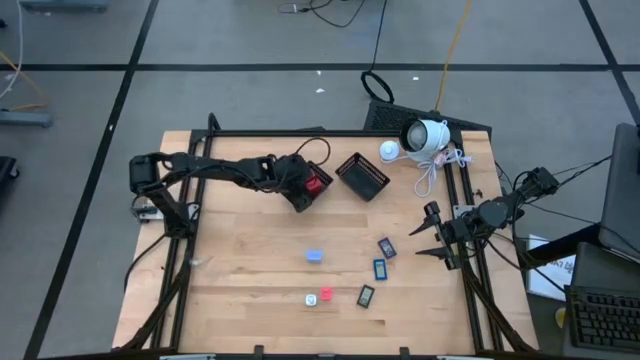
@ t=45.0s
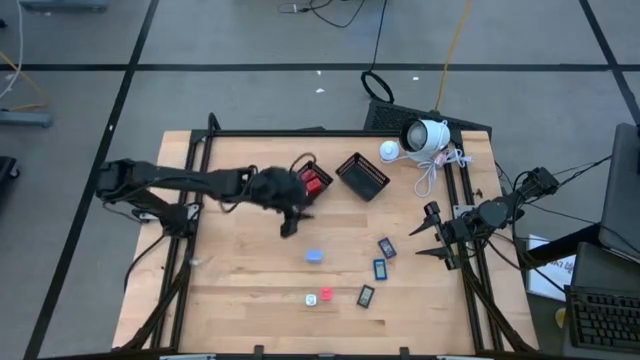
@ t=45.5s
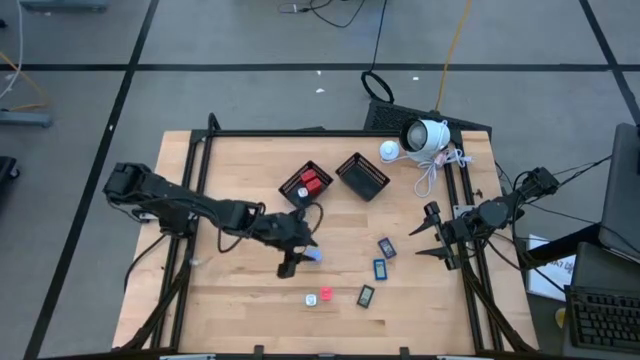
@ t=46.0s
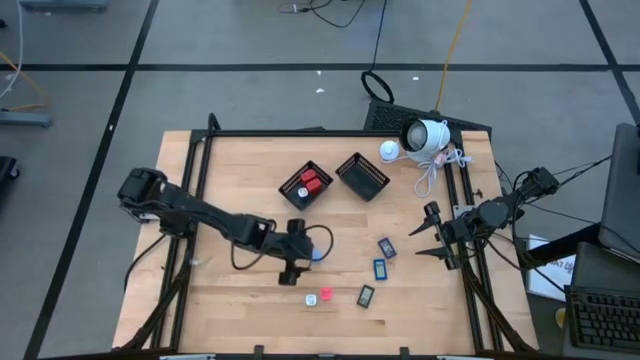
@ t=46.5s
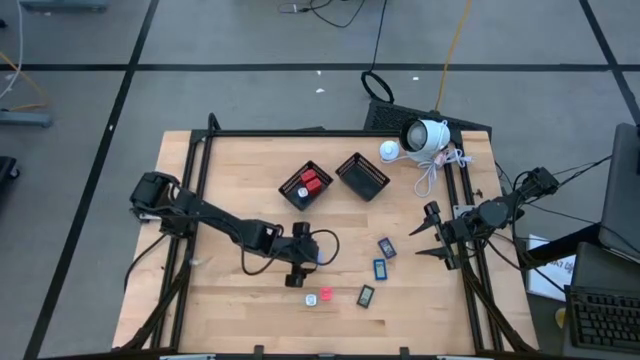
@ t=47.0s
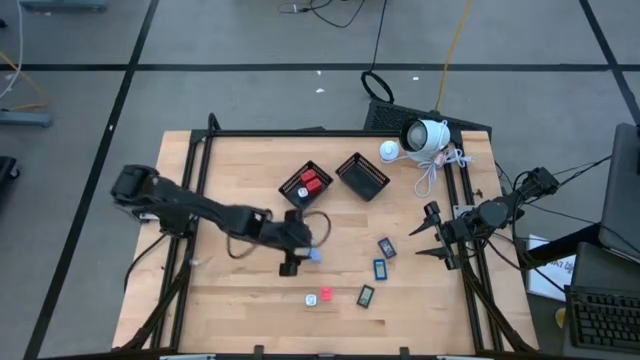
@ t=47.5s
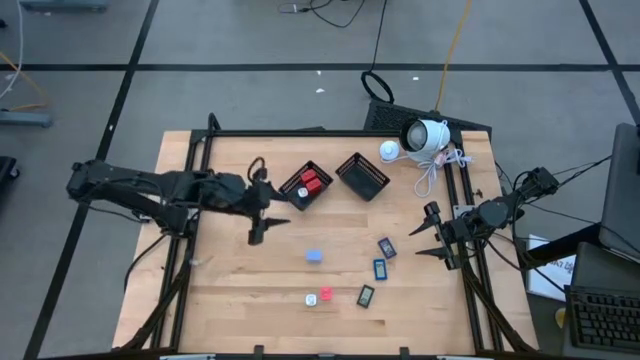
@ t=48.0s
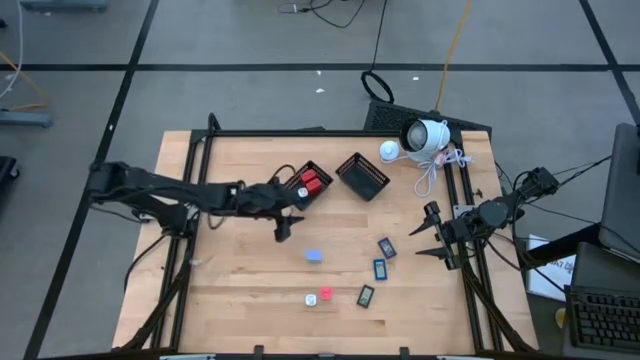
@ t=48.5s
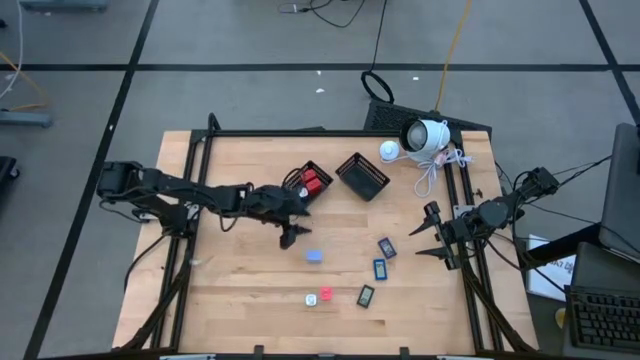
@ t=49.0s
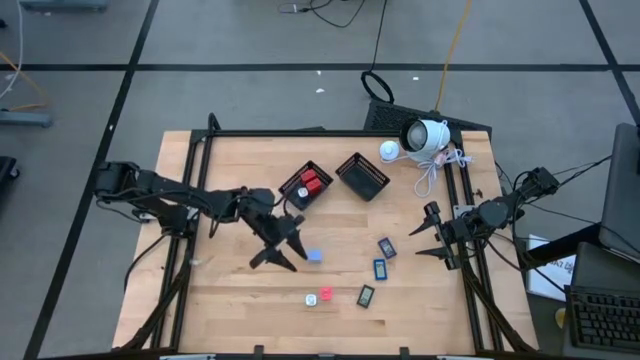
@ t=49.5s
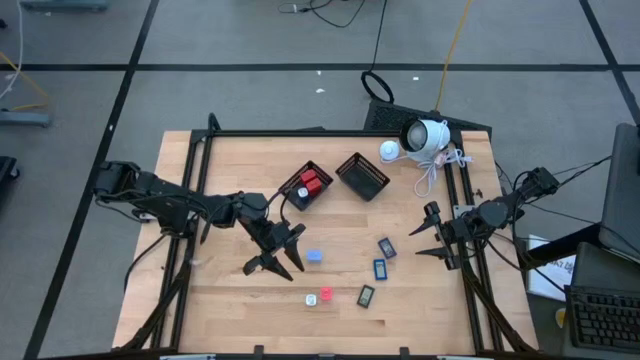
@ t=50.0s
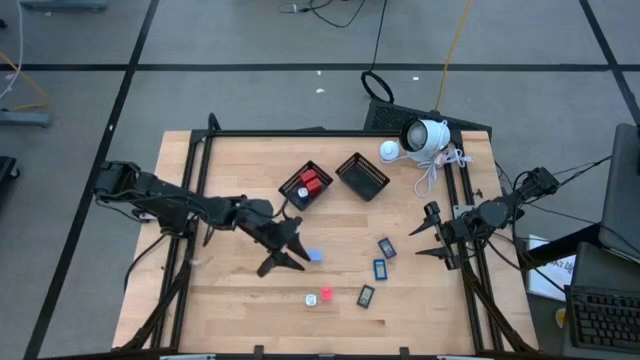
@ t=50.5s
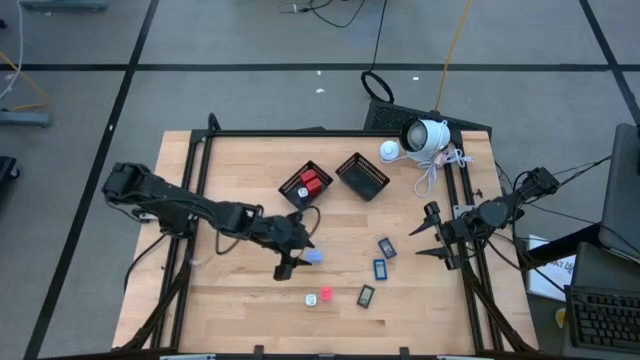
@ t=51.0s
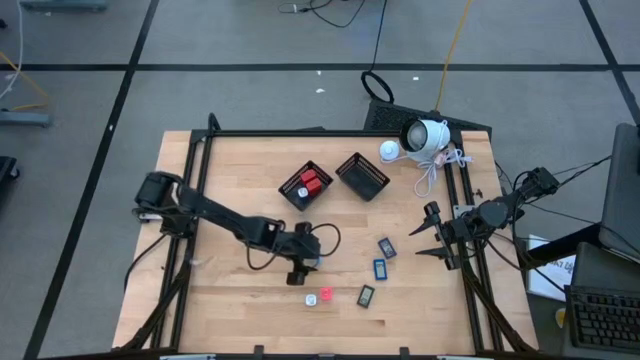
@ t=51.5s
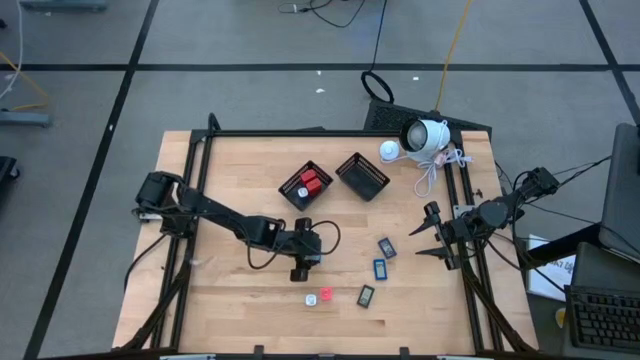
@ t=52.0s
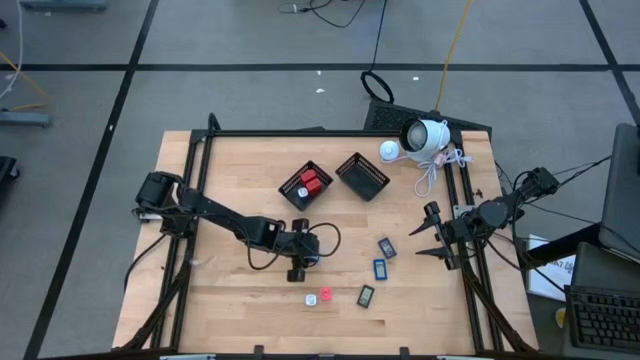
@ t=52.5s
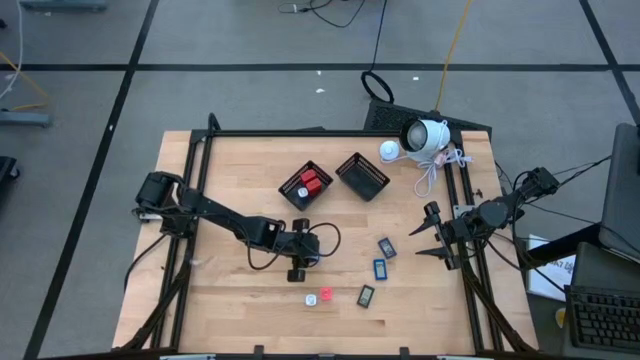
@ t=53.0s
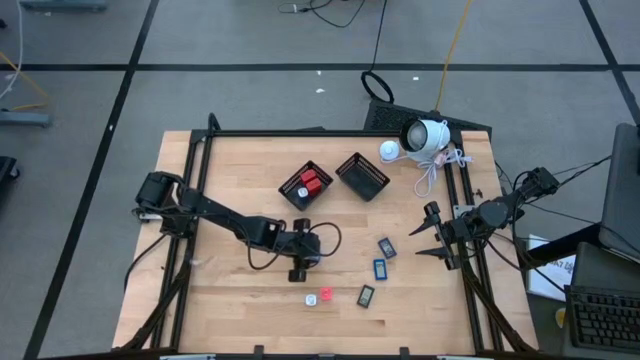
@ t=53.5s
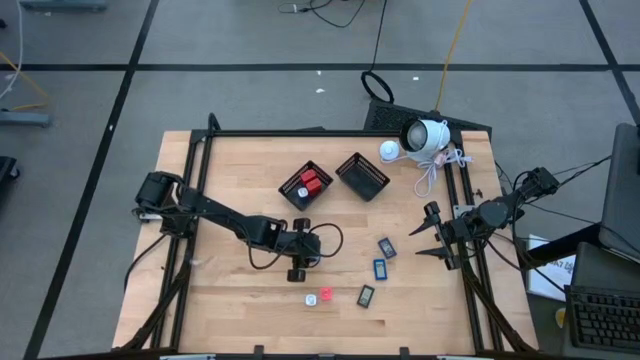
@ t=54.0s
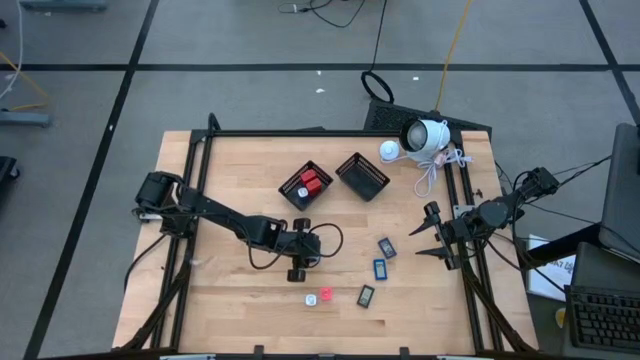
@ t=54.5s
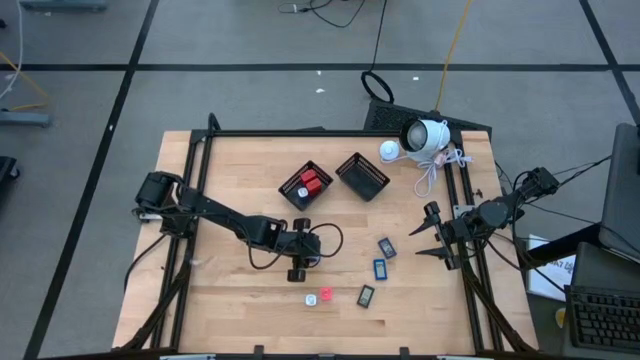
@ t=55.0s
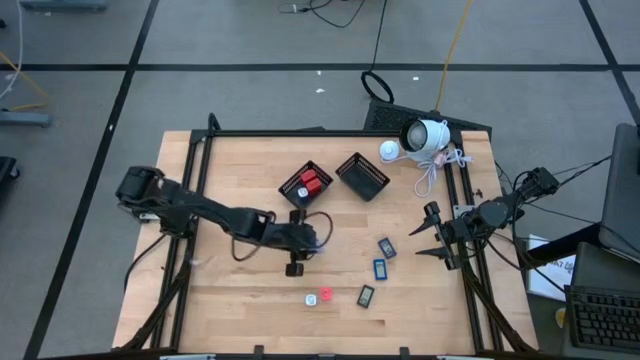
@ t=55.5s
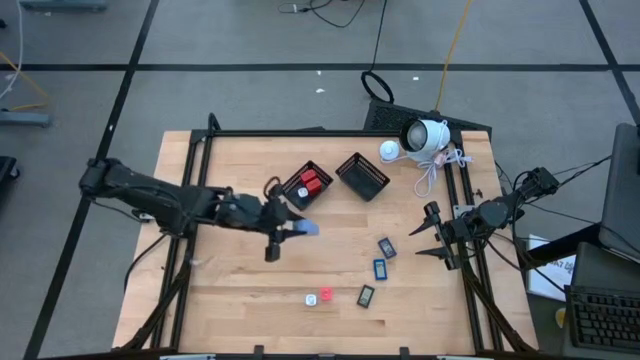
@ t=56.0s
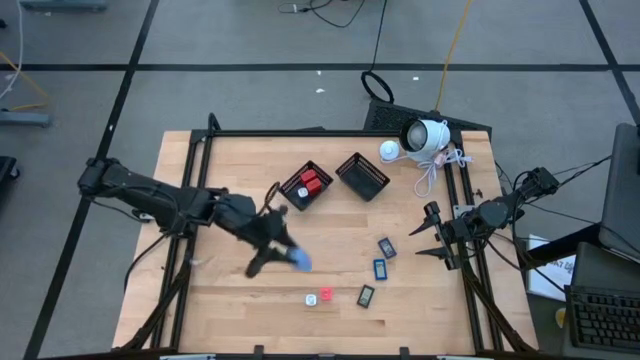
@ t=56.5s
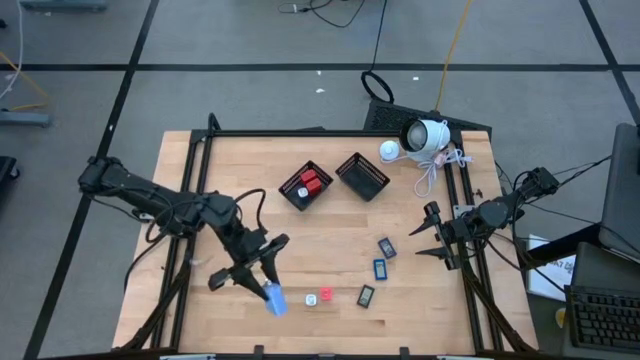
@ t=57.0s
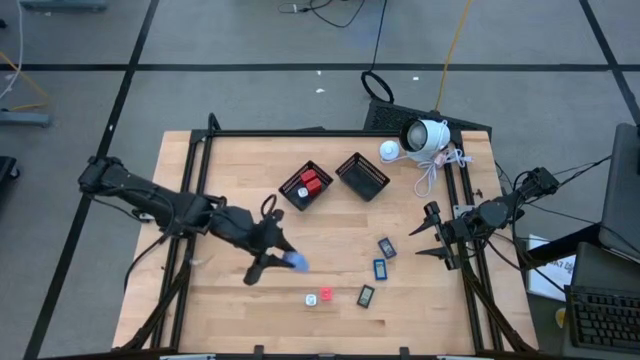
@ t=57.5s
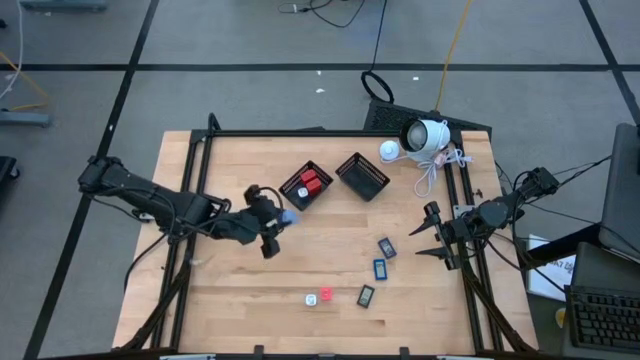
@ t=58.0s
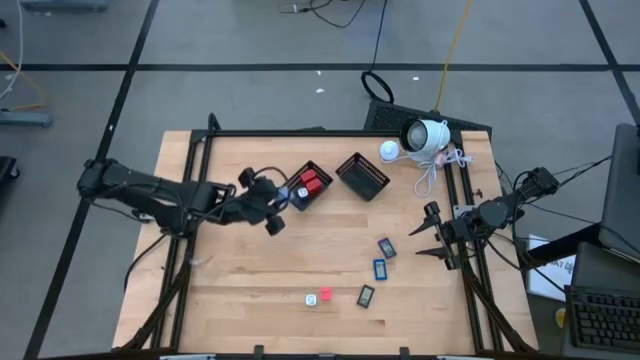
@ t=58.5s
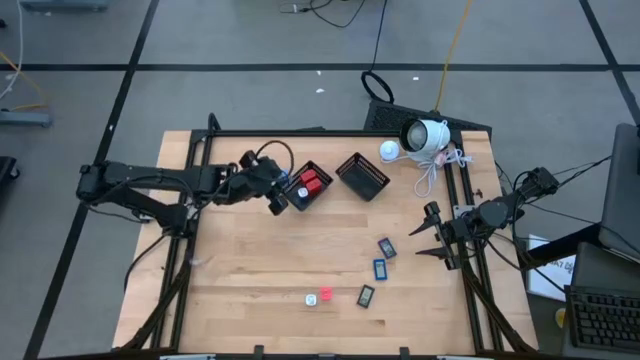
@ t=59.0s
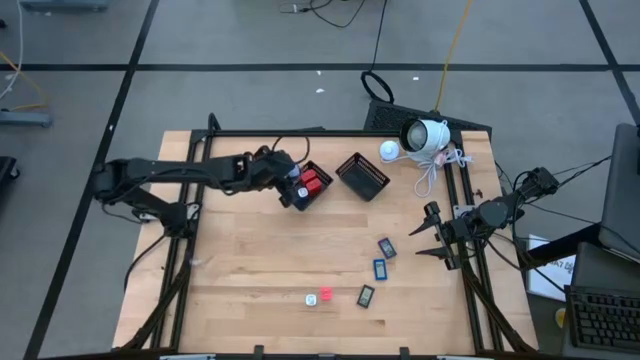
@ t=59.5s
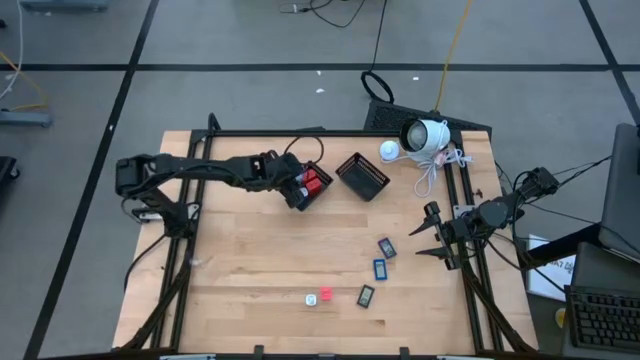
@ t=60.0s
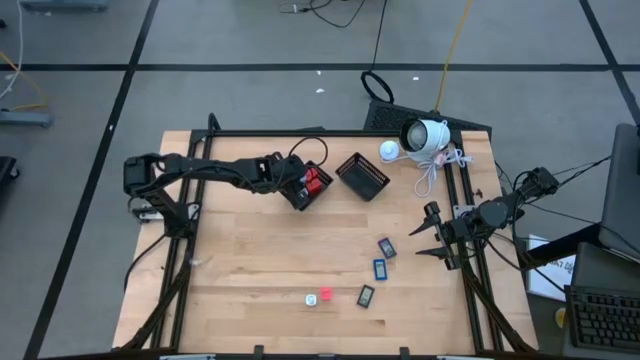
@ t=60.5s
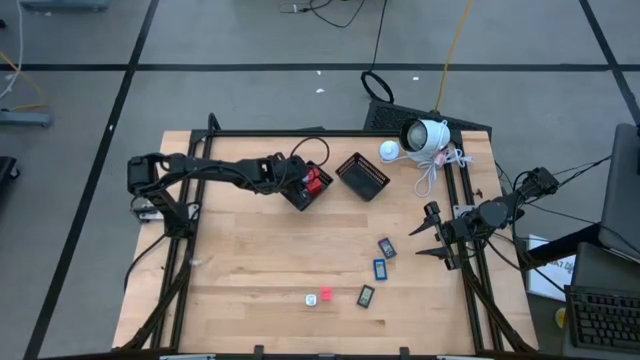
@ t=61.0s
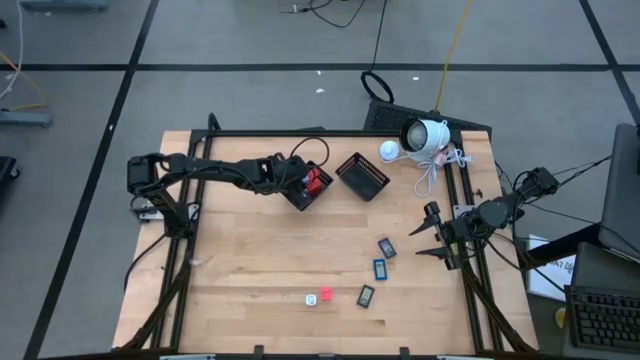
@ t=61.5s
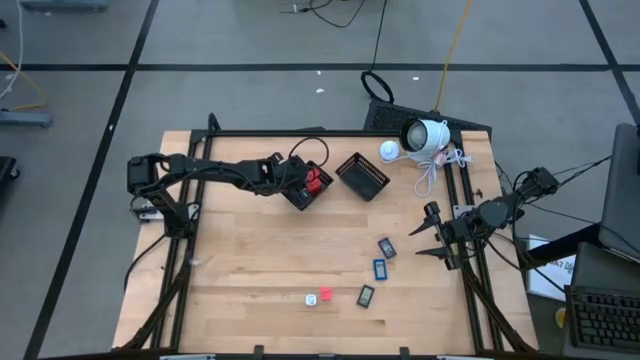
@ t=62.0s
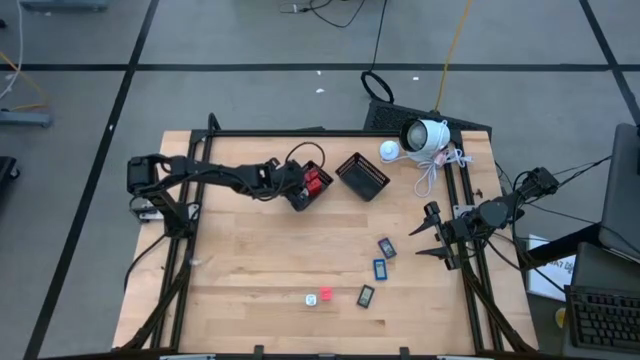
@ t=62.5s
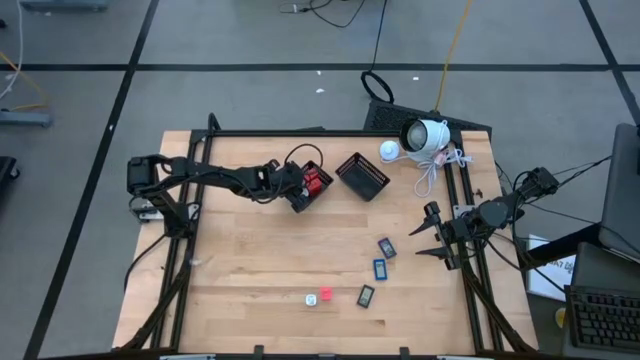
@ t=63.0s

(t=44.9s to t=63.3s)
Task: Pick & Place Office items
Put the blue charger adapter into the left black bin

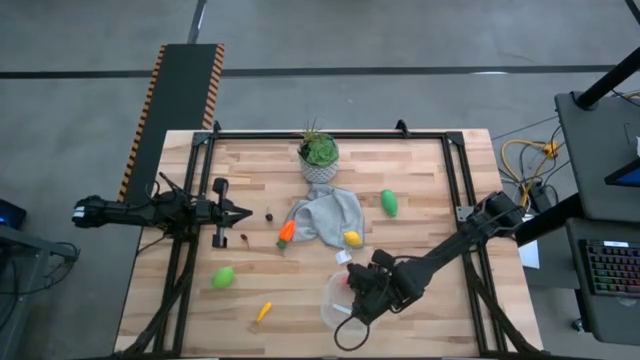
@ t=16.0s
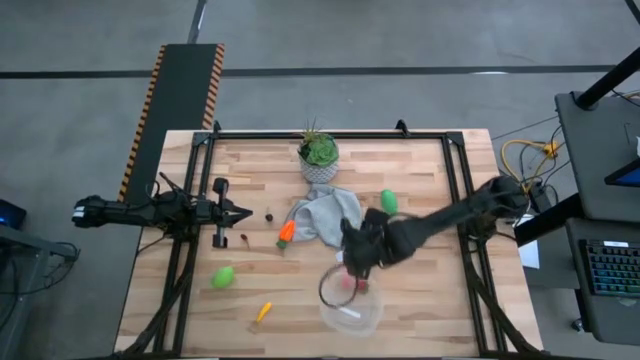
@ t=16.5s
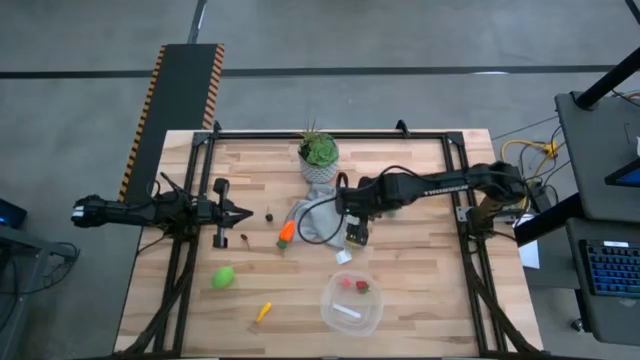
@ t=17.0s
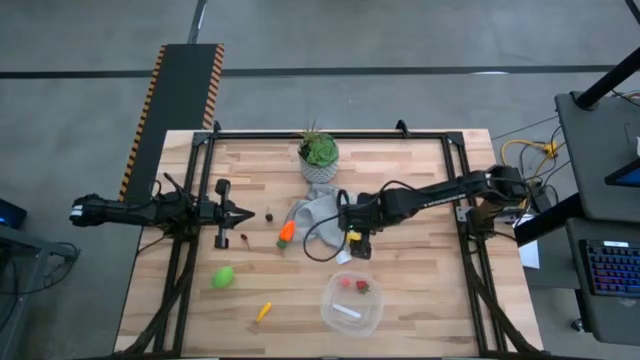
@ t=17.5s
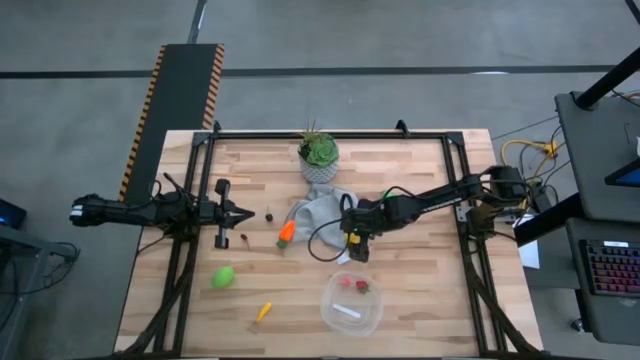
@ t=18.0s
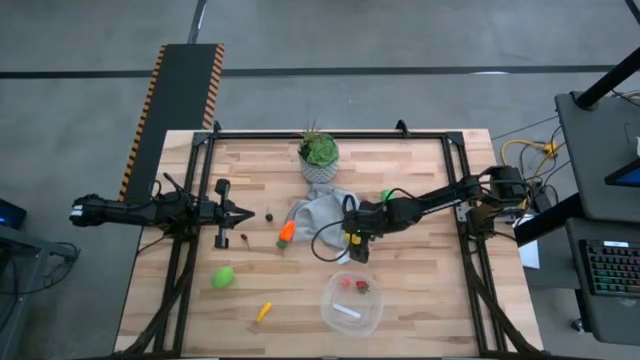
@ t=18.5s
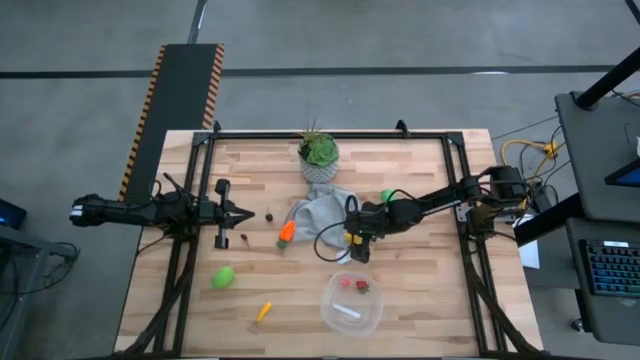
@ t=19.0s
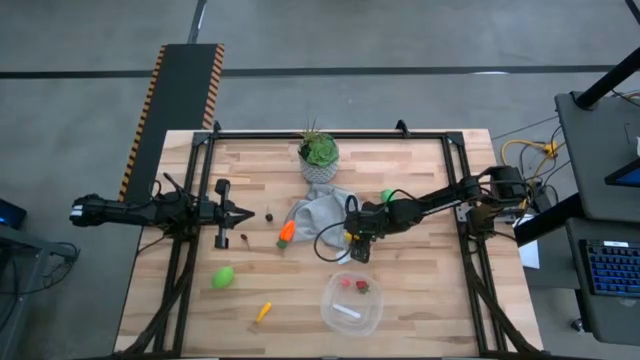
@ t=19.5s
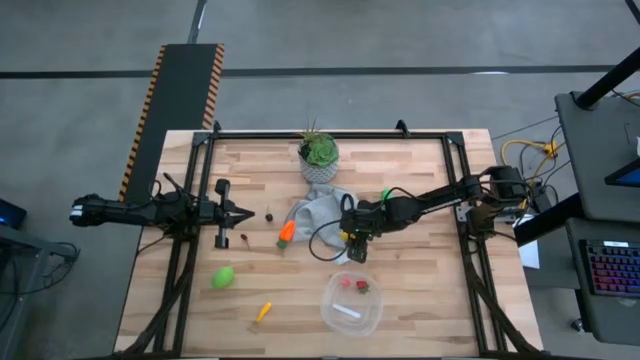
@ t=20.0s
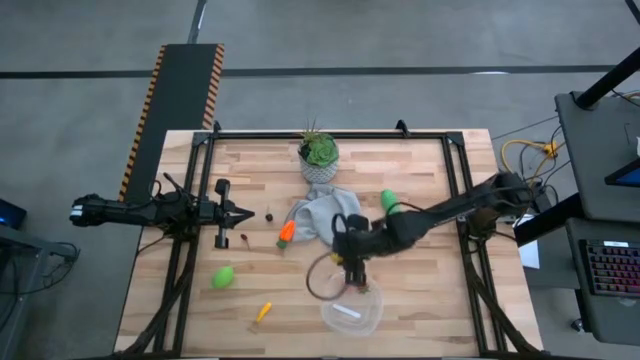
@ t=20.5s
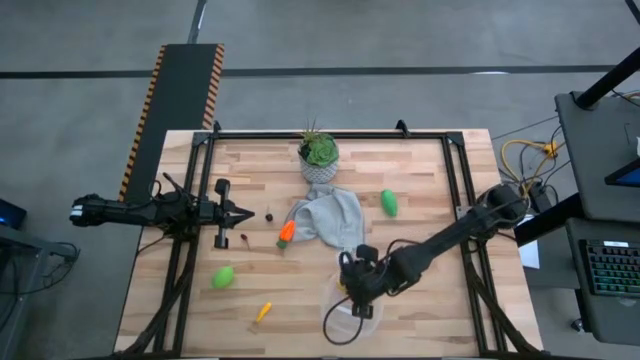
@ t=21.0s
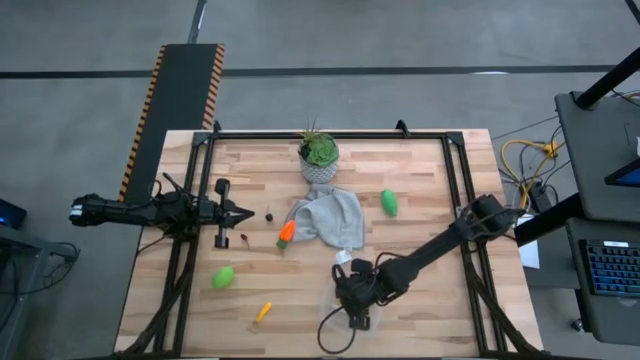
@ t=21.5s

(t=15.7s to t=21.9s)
Task: Pick and placing Produce into tupperware
Put the lemon into the transparent bin
